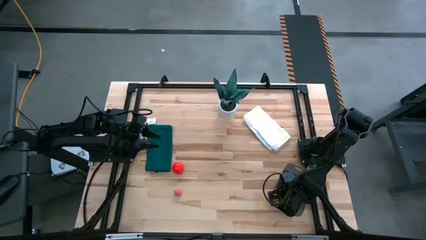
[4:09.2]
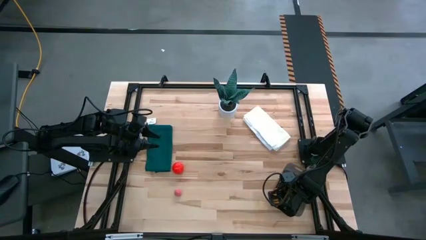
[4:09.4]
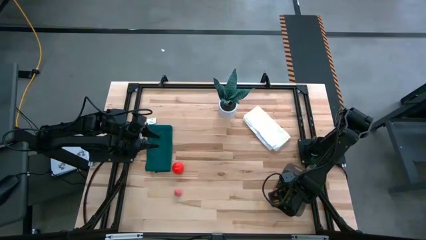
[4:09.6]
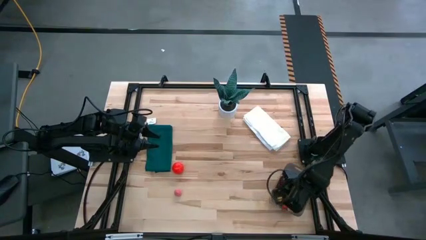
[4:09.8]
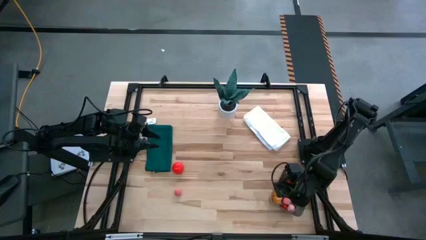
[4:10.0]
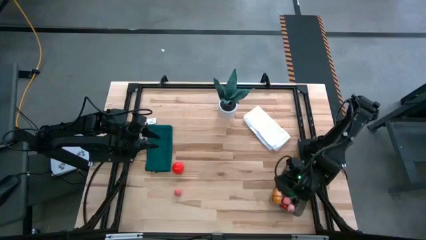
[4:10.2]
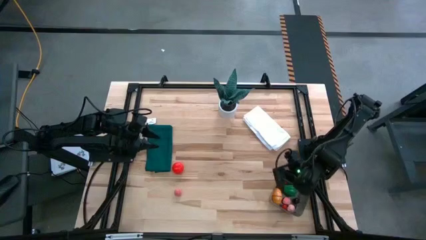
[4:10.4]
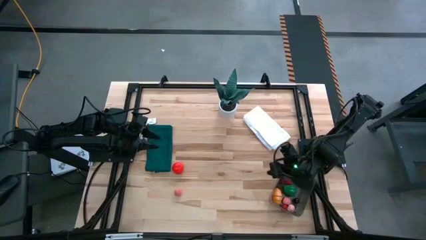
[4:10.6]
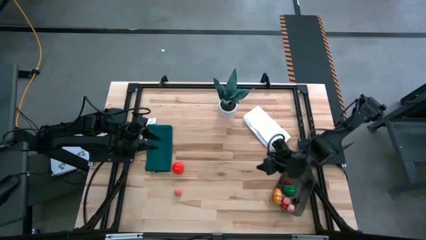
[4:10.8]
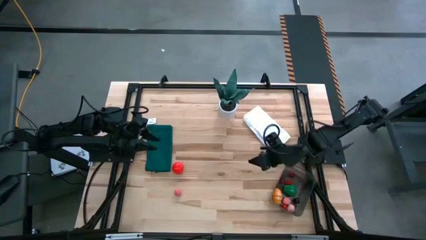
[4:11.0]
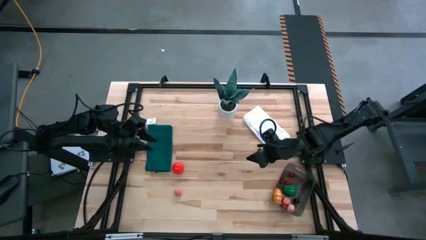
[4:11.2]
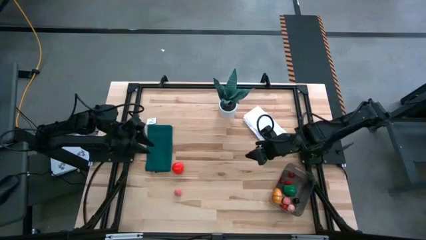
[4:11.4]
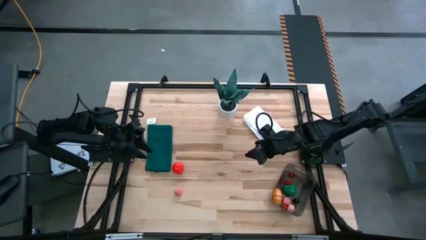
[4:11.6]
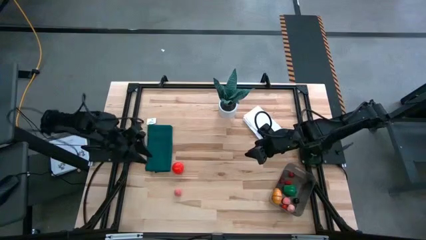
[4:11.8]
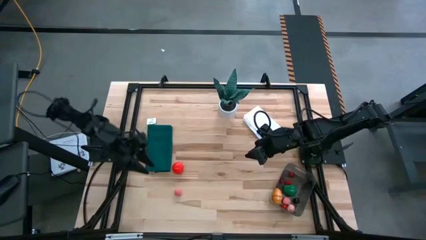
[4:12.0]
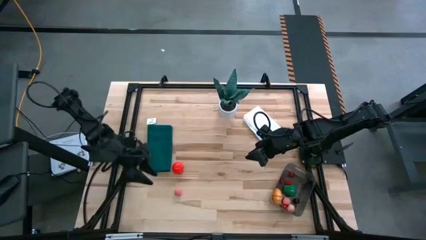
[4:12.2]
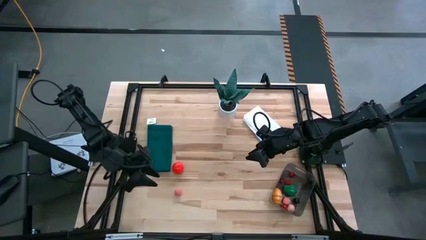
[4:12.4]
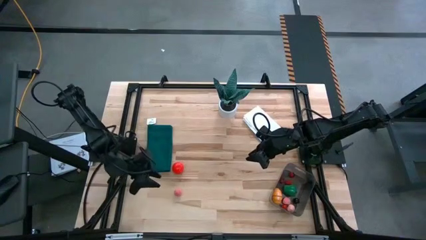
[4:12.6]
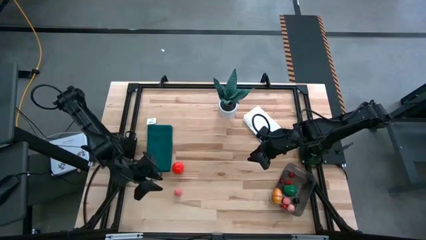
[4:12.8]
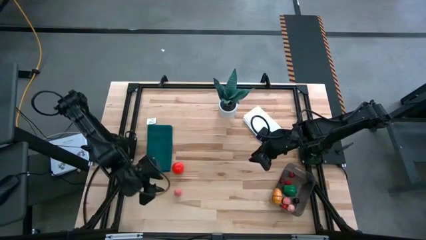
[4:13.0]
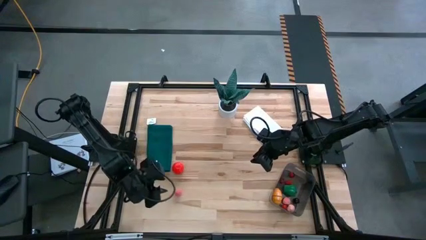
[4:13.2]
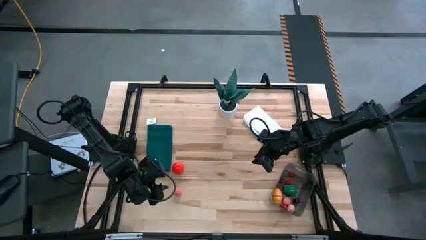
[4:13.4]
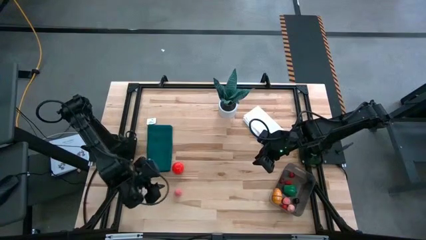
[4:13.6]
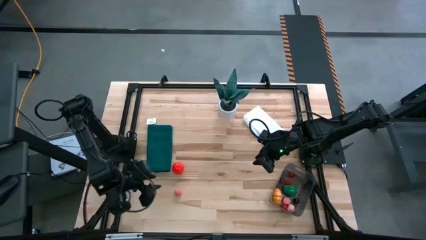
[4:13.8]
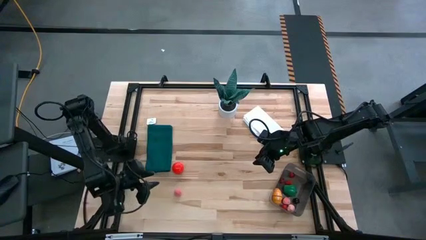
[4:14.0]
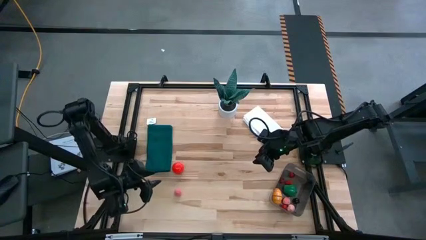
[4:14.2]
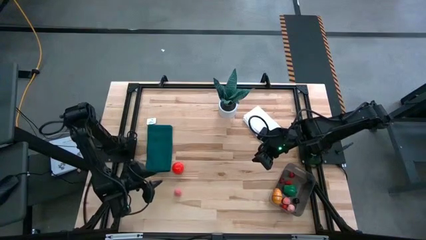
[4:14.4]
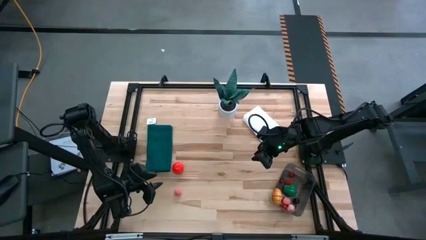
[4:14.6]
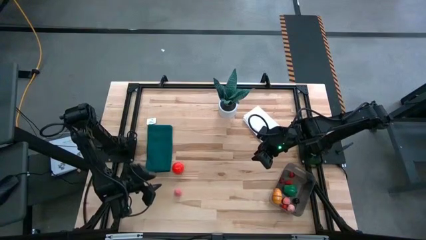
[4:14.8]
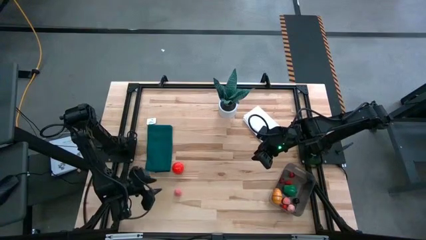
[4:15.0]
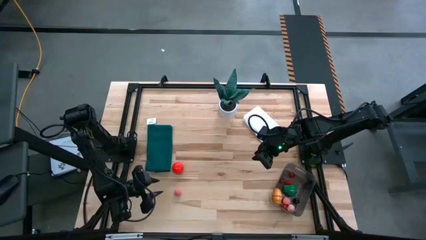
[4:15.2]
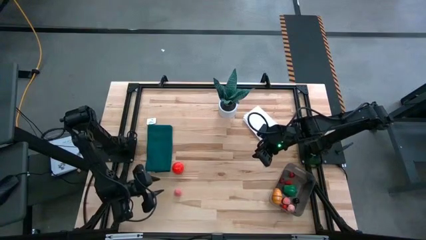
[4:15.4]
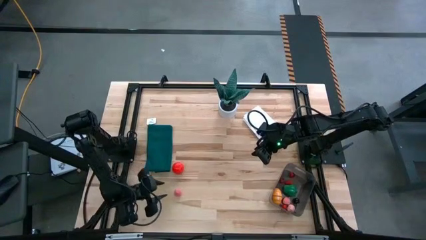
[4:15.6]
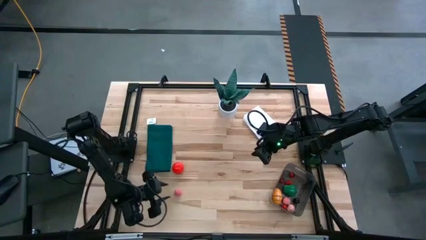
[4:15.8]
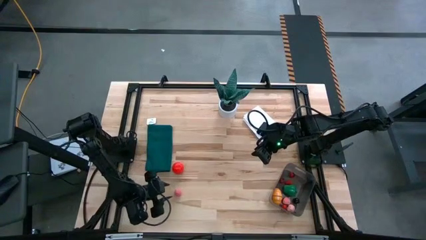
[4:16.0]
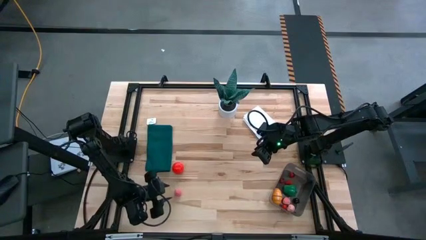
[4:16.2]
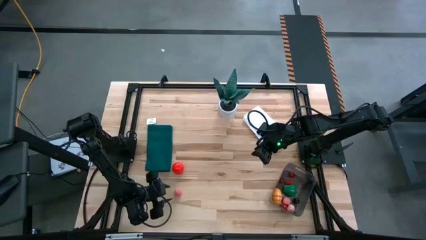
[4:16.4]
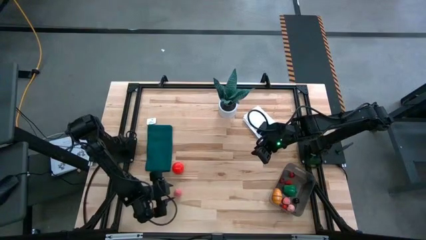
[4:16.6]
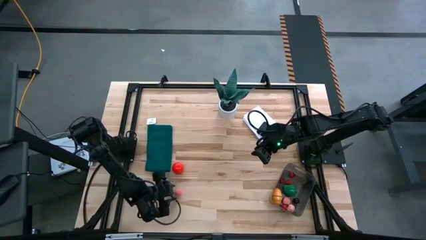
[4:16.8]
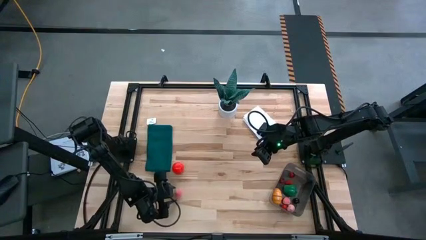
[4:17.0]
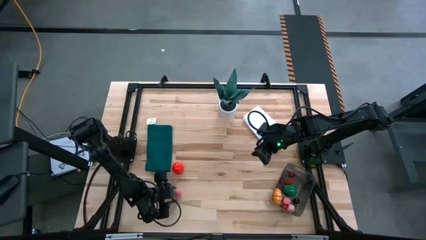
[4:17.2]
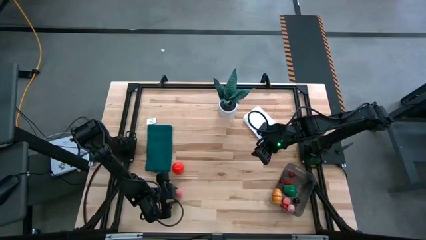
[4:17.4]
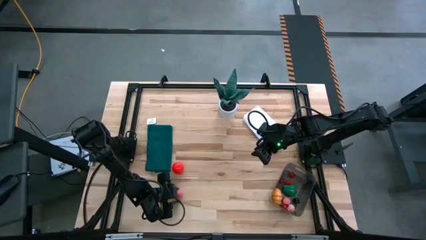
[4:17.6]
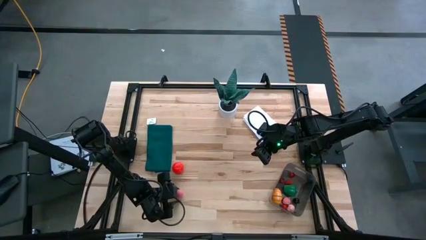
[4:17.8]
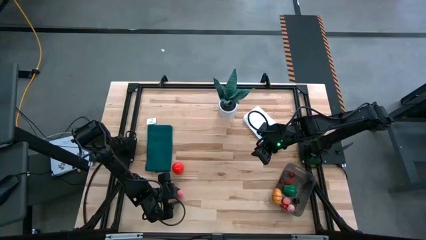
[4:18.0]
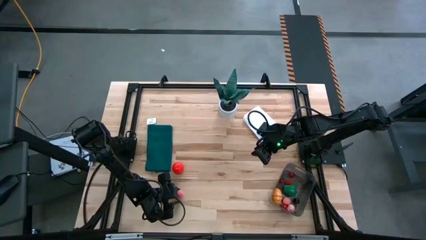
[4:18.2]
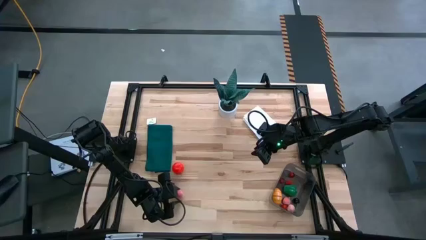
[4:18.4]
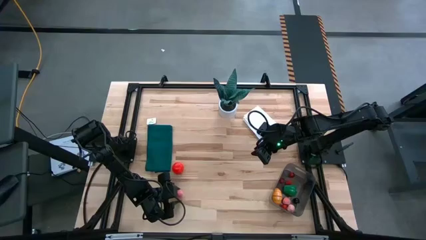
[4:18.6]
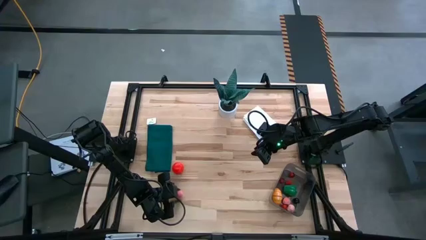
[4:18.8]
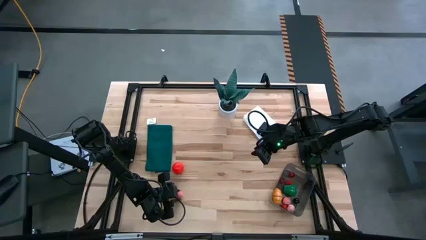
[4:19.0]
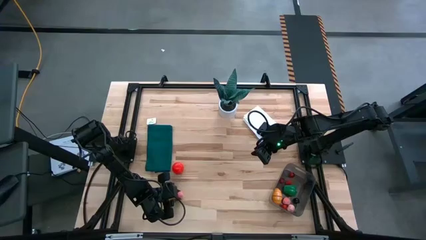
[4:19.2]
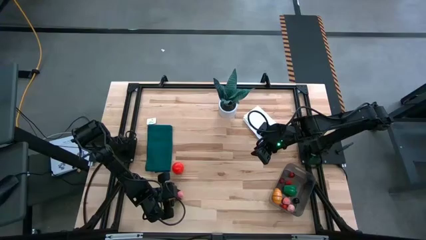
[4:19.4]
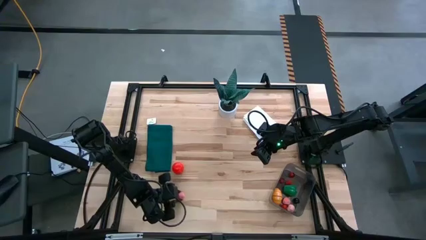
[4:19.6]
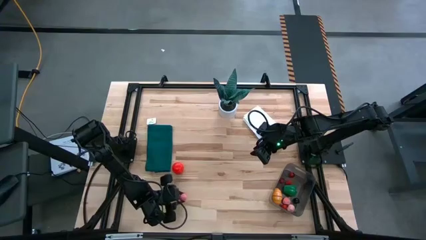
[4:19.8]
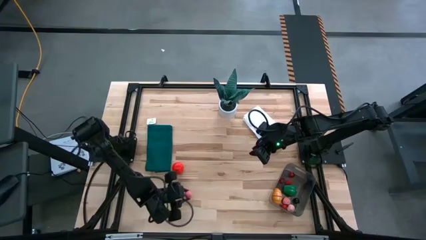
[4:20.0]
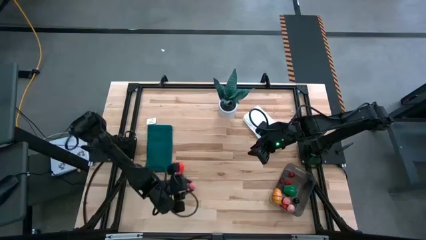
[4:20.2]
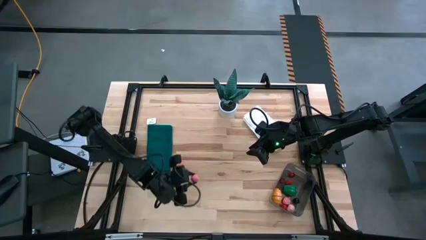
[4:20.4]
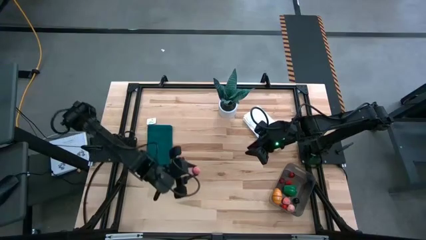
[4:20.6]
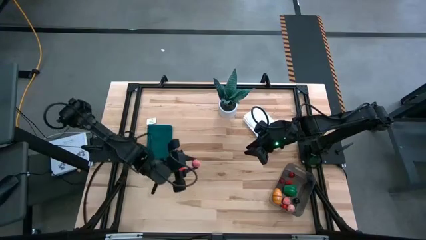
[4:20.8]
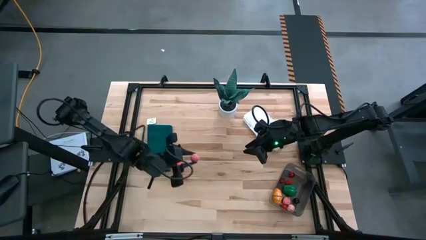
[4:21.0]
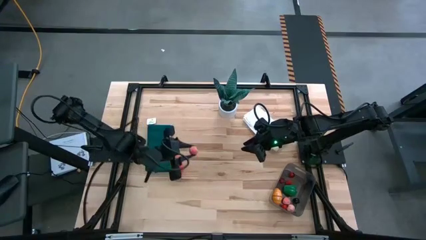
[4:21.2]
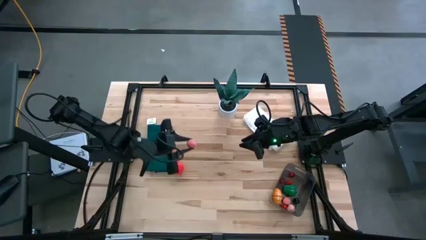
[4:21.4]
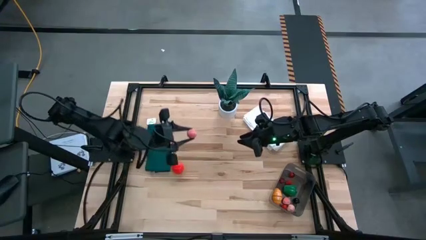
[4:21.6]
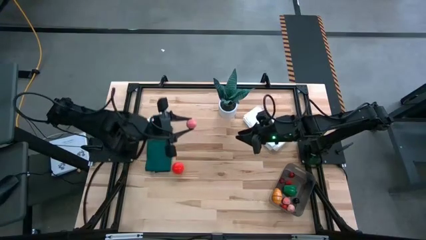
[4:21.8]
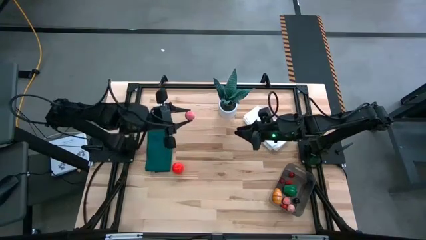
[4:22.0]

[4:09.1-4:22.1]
Task: Pick and placing Produce into tupperware
Put the pink peach into the black bin

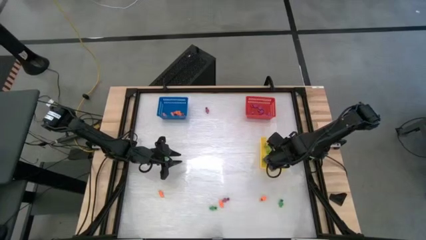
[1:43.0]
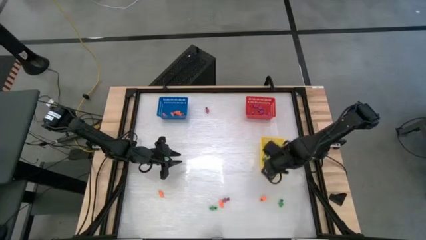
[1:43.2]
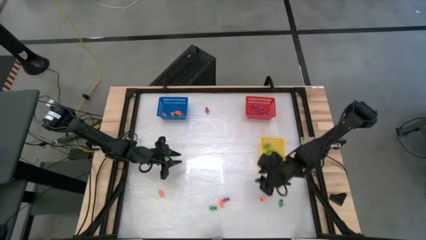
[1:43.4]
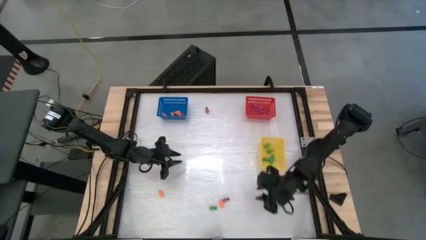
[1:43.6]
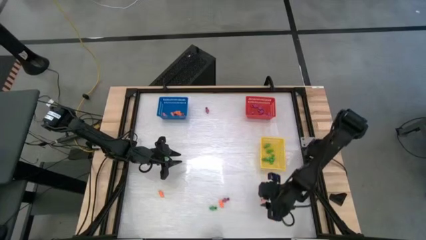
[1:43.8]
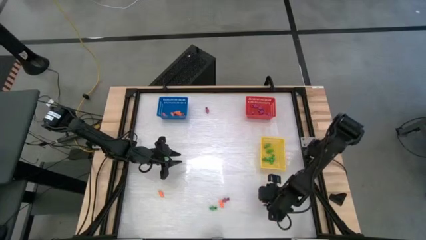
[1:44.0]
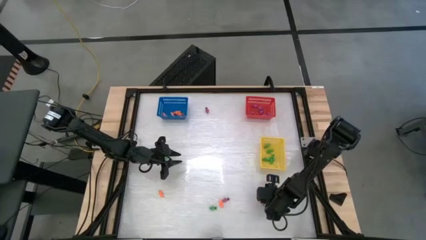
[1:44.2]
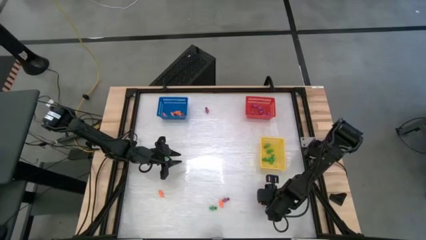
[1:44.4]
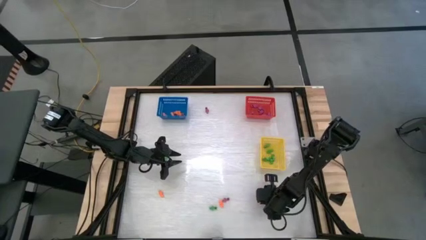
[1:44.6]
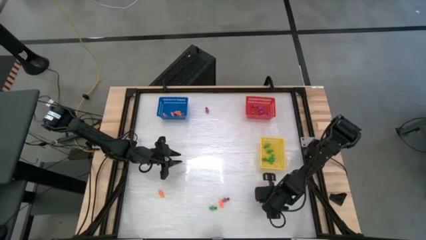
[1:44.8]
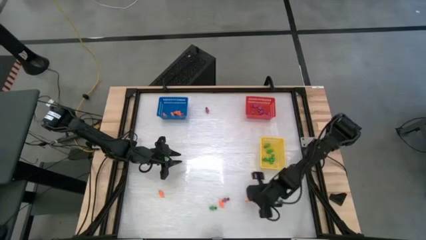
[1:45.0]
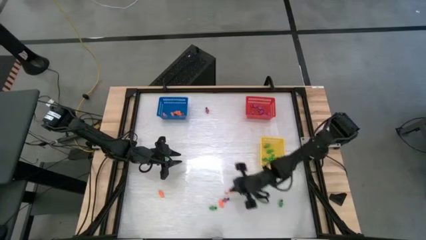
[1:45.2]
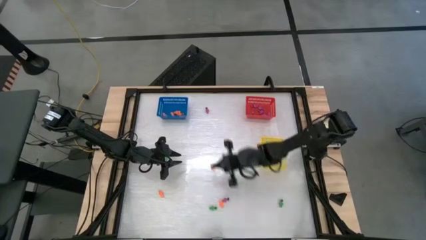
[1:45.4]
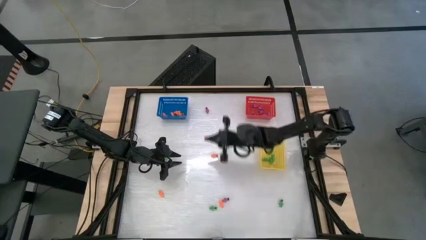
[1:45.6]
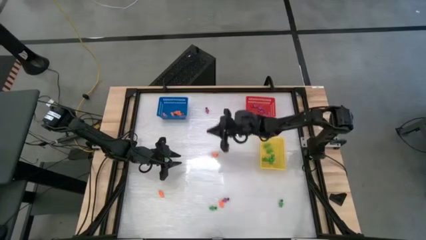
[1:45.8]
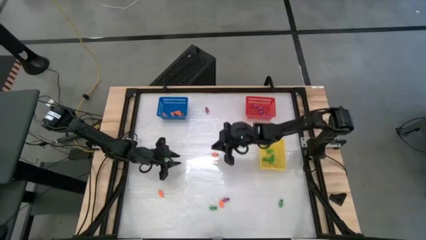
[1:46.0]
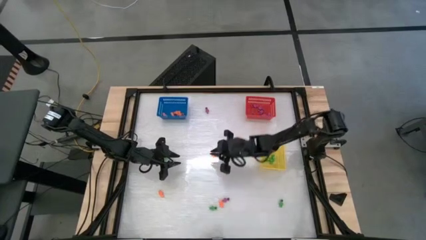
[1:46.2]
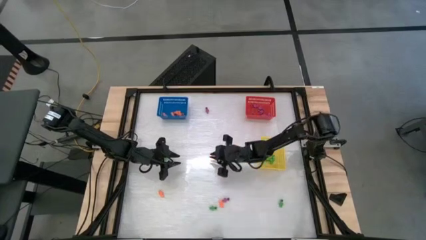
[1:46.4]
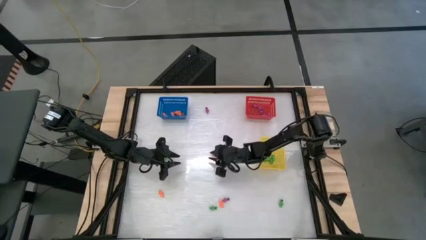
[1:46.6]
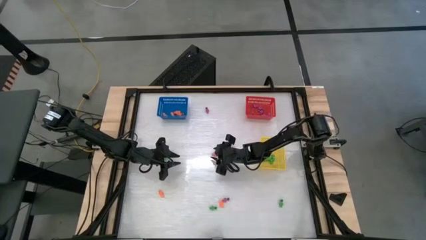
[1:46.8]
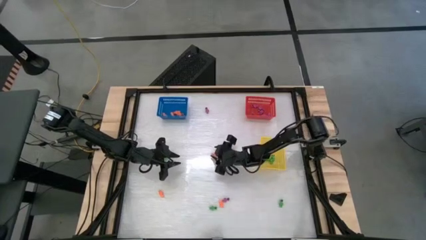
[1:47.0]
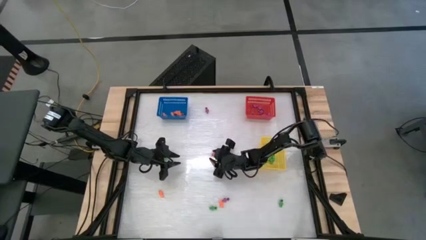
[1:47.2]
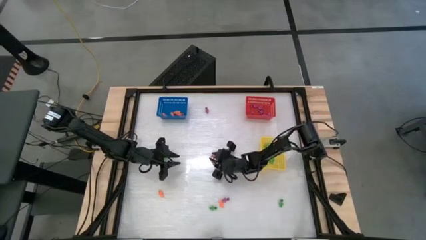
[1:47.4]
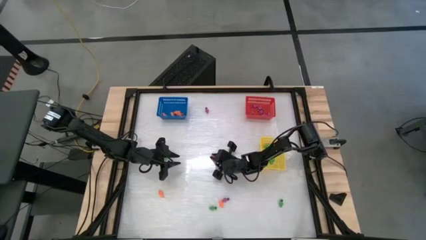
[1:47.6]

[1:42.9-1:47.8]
Task: Sort Halloween decoration
Put the orange skeleton toy into the blue bin

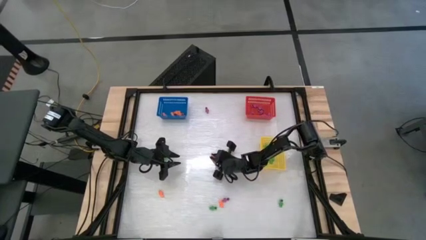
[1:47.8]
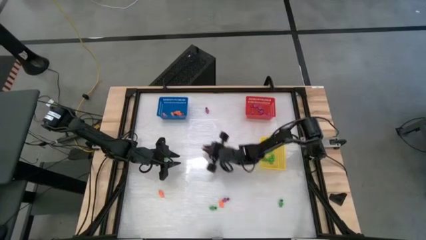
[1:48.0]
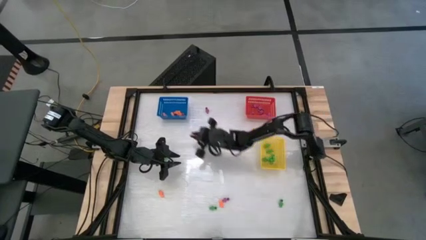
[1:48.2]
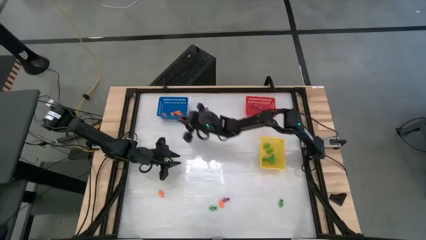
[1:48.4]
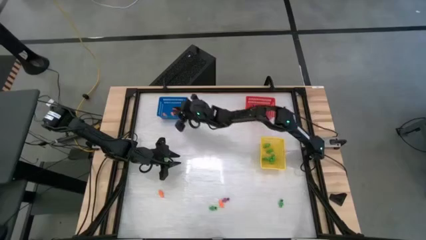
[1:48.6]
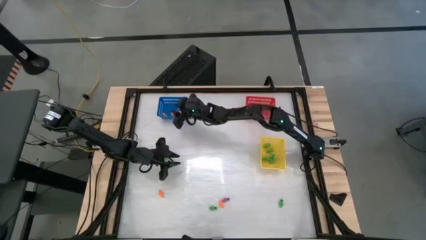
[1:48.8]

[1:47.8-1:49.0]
Put the orange skeleton toy into the blue bin
